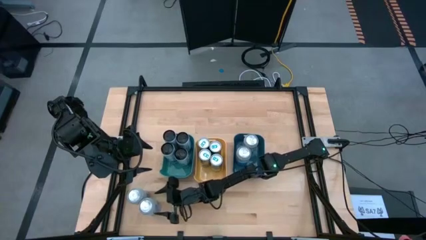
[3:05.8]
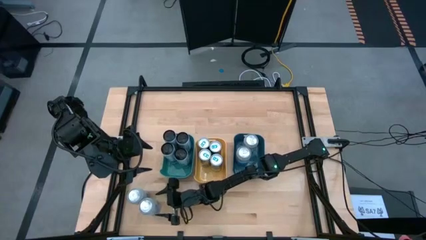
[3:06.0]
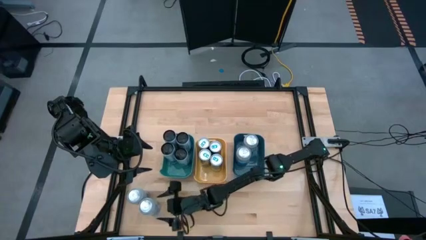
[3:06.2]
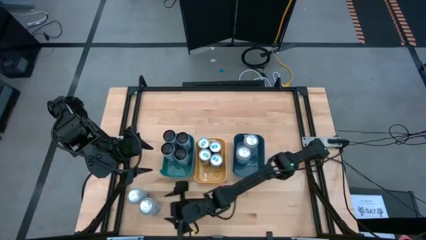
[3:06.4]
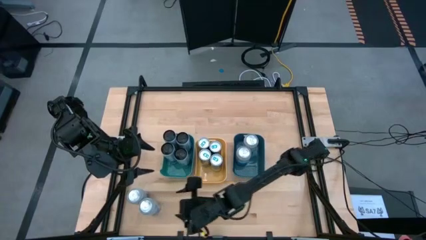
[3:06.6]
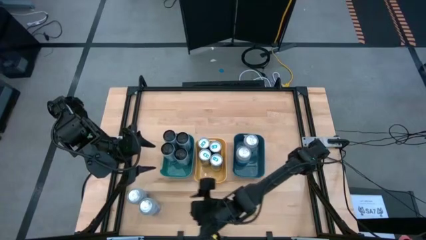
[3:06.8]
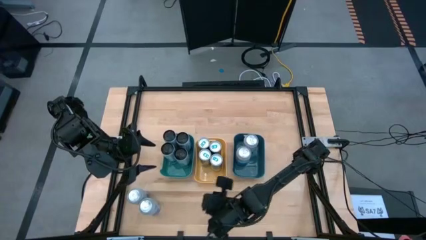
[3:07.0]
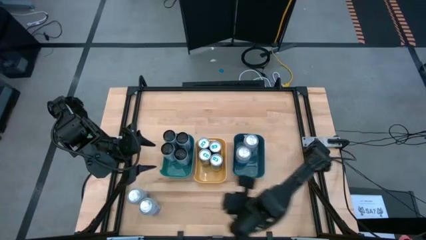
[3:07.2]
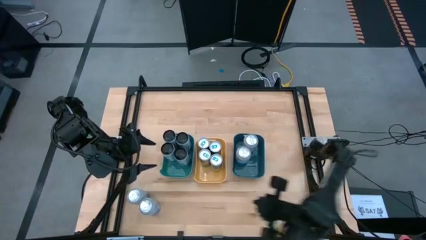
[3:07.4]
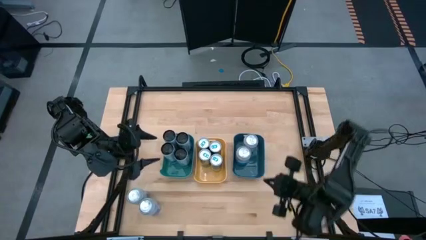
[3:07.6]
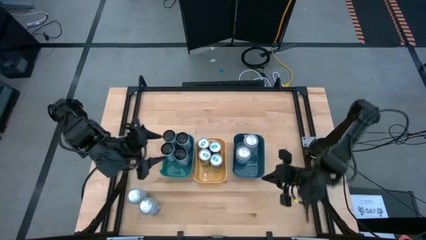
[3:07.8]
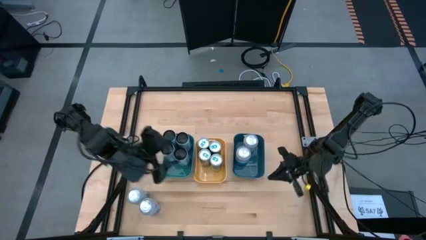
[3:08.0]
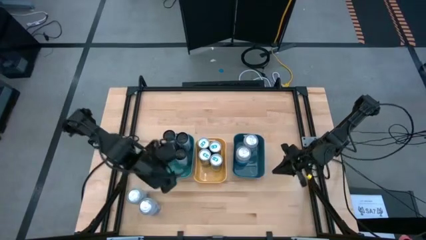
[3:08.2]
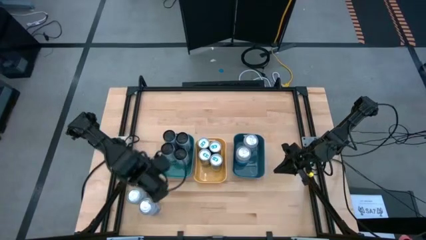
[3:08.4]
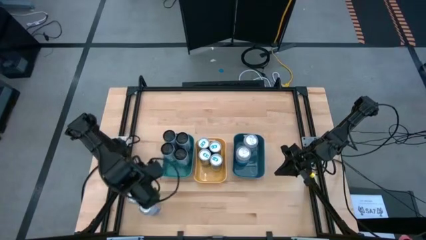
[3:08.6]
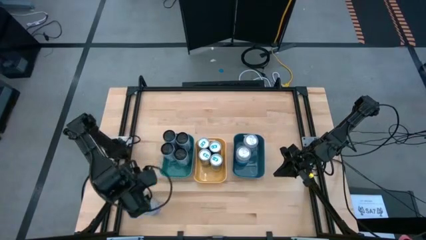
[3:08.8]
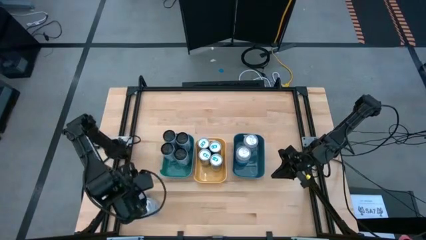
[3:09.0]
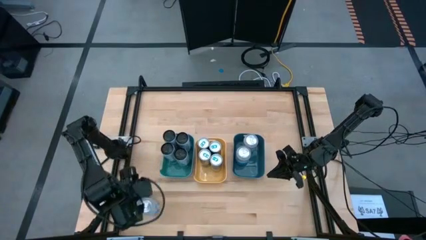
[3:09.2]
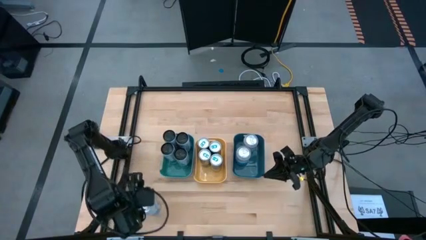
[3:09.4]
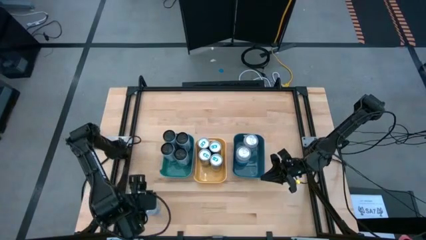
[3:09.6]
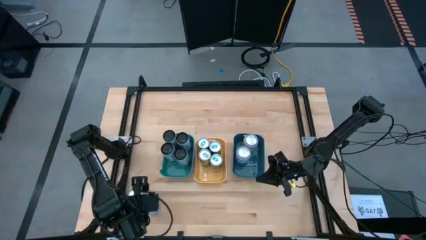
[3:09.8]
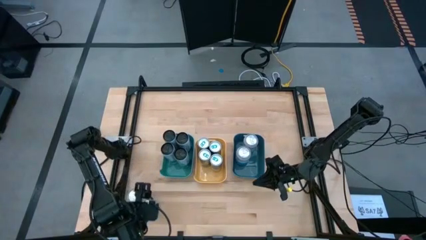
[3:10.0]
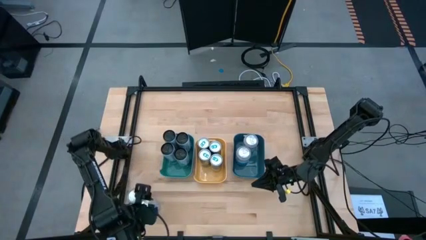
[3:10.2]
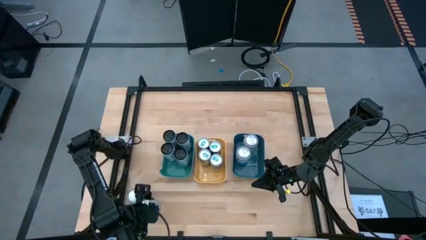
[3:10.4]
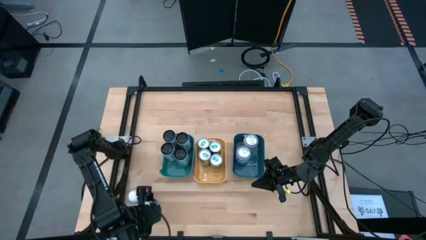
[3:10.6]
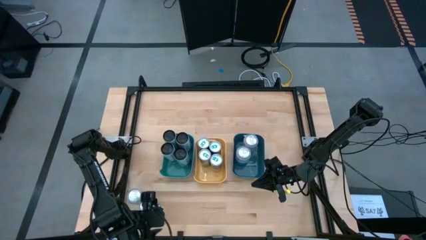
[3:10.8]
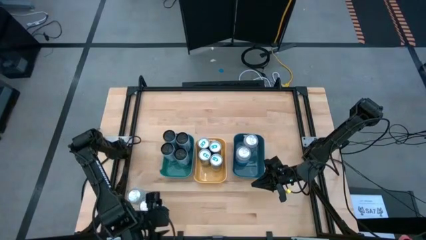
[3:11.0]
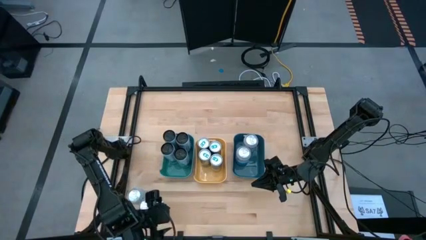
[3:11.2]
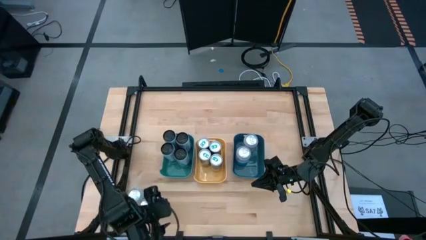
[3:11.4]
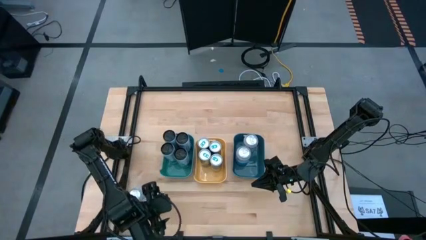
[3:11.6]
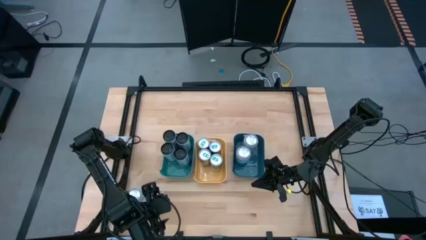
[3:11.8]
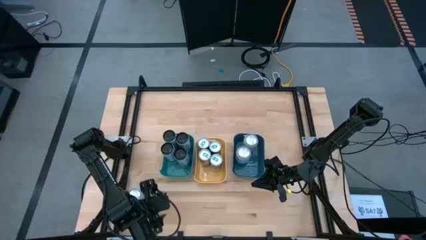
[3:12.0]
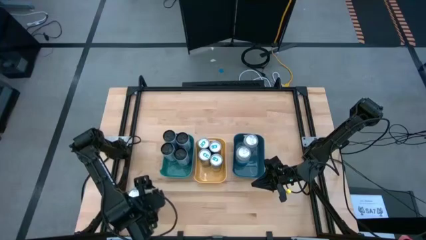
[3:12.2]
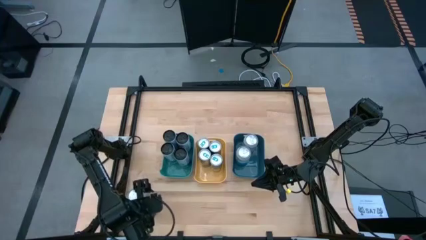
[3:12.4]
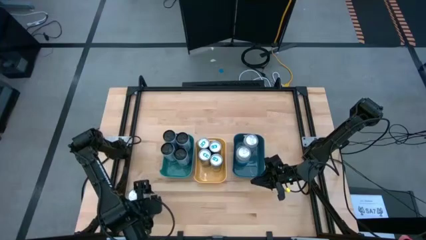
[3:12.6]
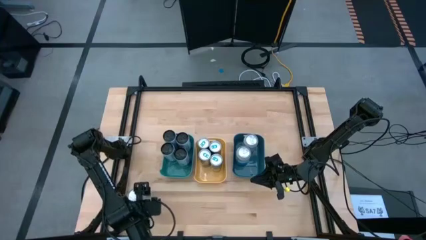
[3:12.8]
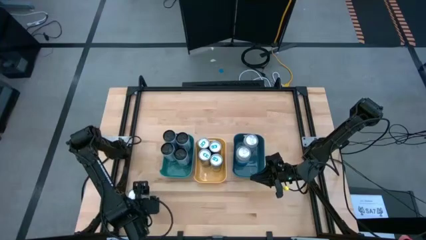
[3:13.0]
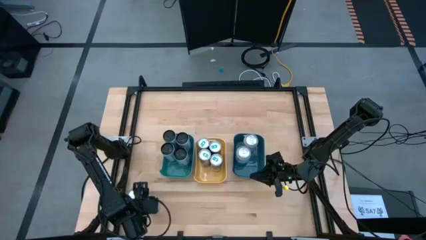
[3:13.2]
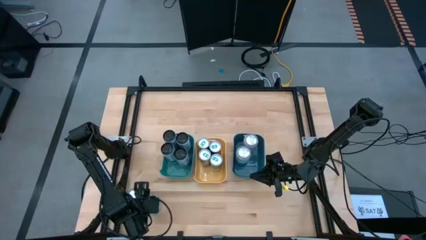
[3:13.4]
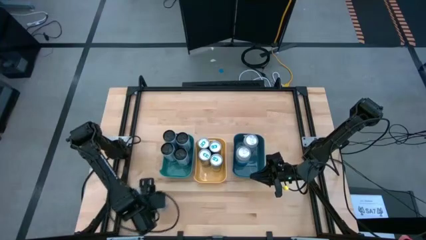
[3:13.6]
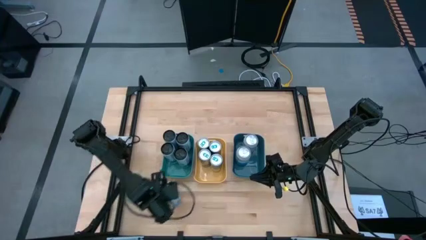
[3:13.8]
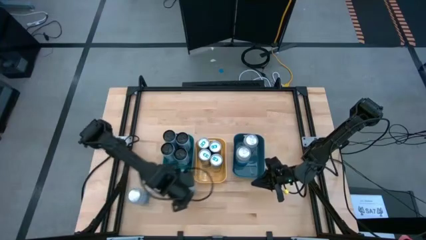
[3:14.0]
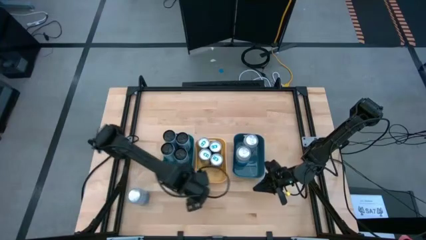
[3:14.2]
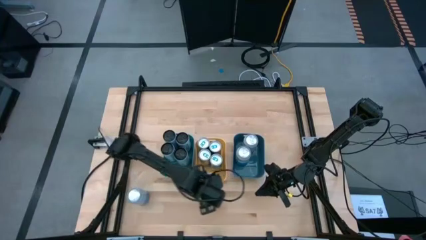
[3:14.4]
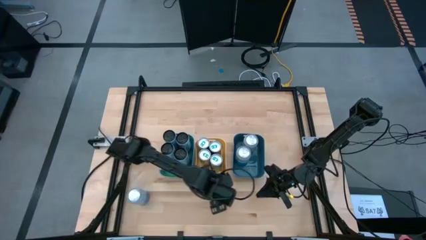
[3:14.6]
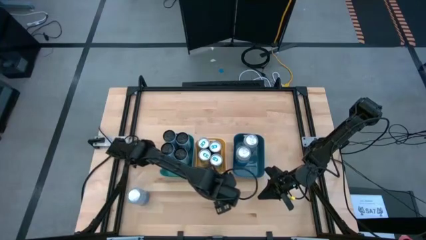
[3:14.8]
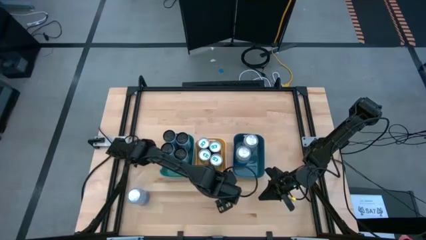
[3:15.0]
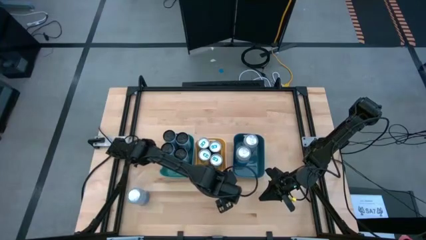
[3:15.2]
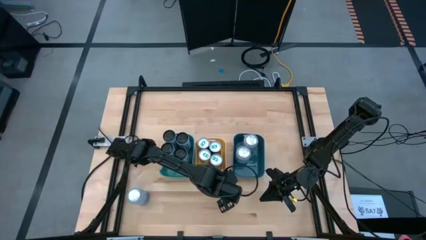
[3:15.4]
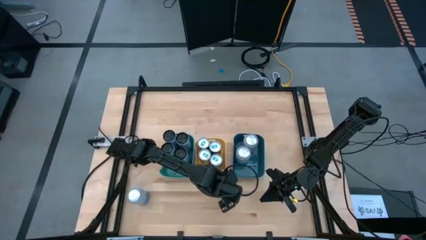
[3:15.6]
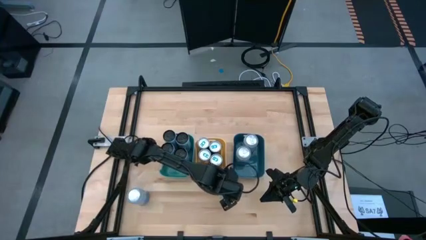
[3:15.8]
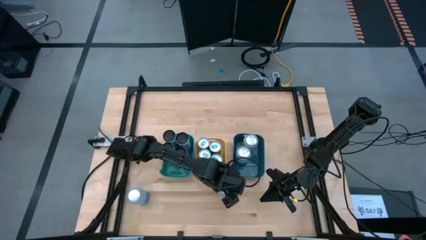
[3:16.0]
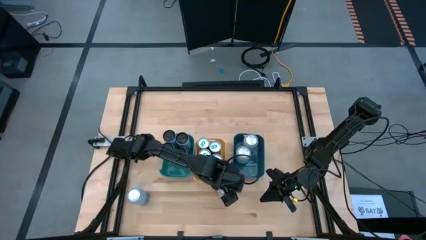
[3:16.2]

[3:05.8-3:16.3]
Task: Sort soda cans
Move the bottom right silver can to the lower middle of the table

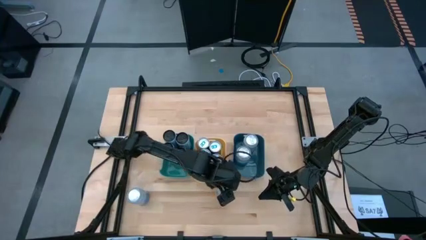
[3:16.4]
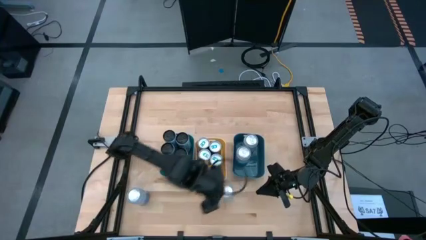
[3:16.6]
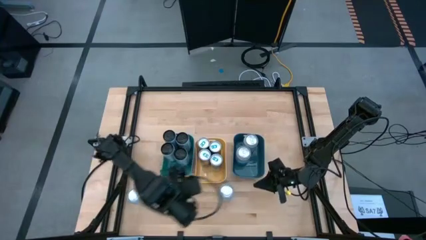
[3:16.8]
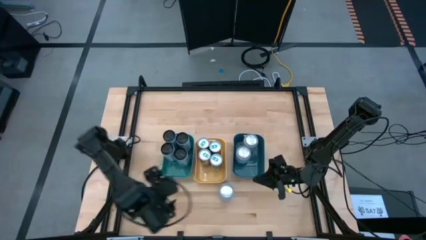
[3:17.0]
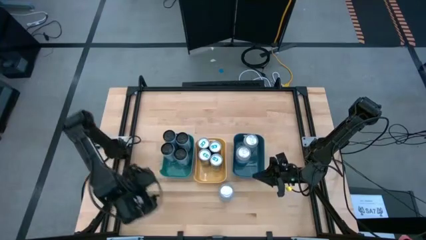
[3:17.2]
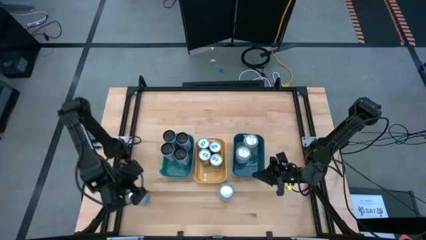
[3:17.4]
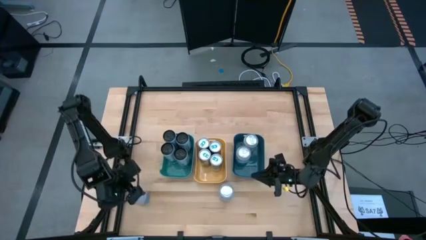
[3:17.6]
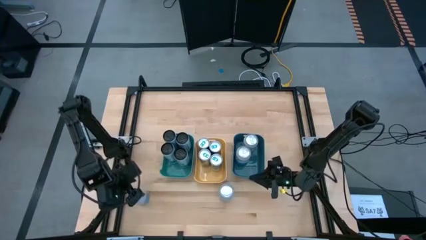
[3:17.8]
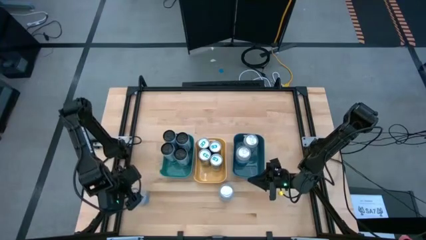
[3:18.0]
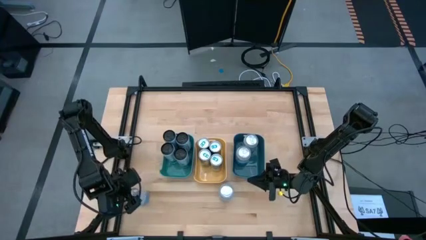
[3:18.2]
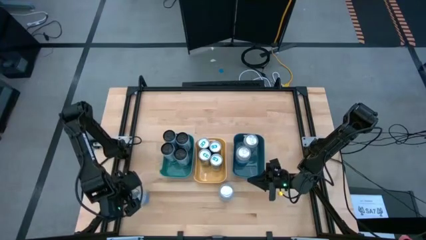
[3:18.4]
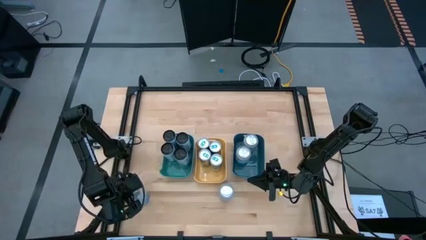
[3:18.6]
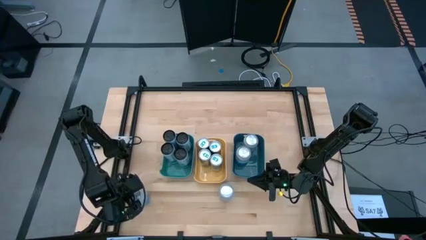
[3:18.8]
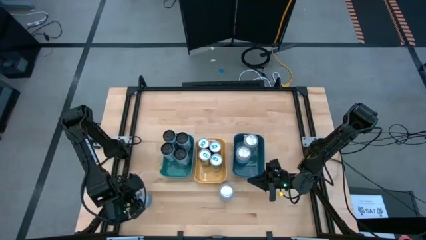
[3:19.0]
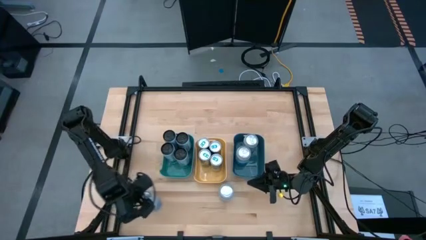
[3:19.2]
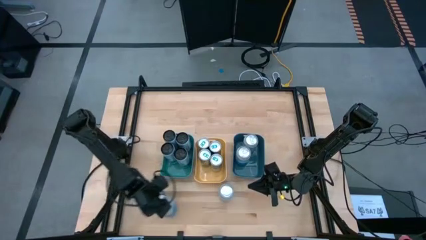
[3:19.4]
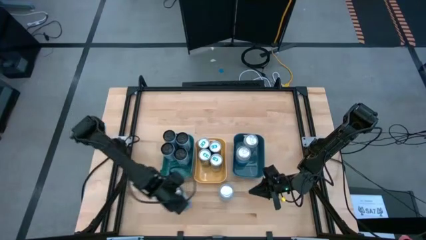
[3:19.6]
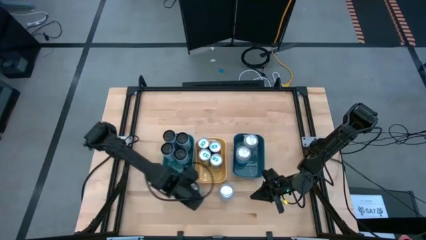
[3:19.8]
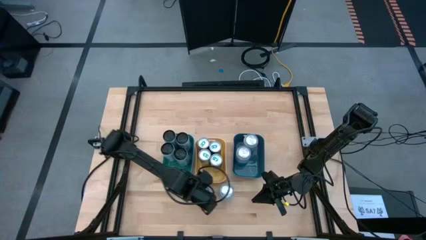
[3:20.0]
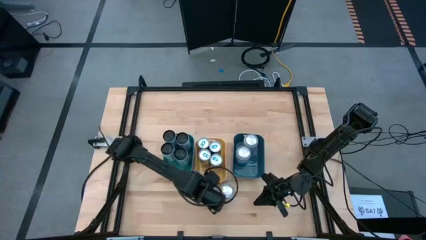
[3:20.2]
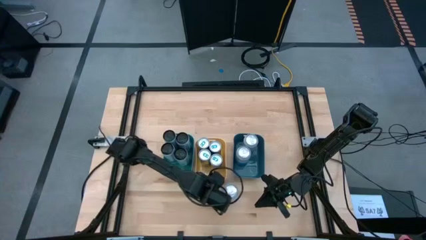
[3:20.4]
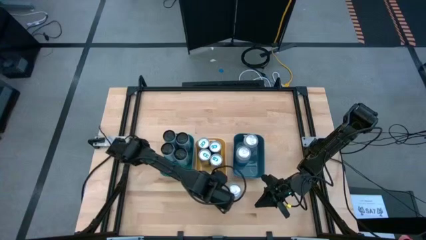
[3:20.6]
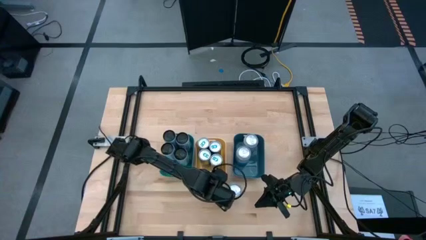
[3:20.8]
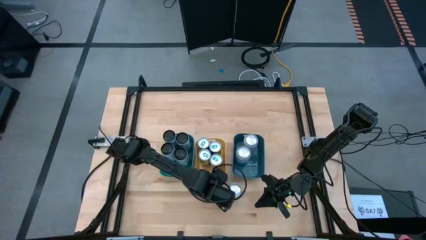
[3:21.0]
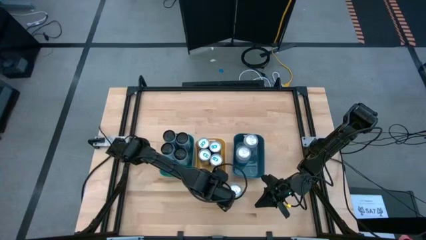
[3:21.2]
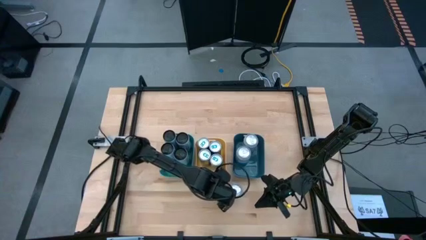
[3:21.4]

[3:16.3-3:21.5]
Move the left silver can to the lower middle of the table
